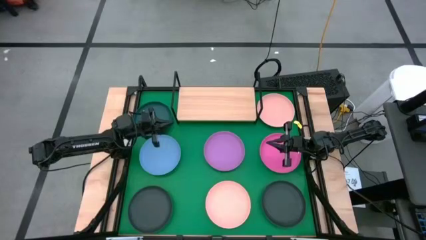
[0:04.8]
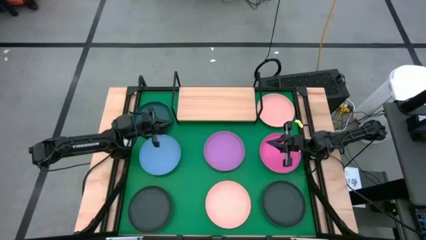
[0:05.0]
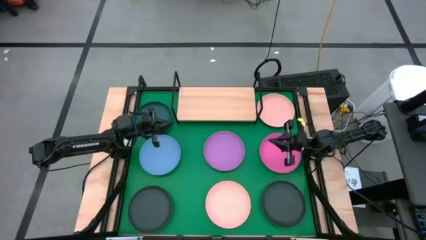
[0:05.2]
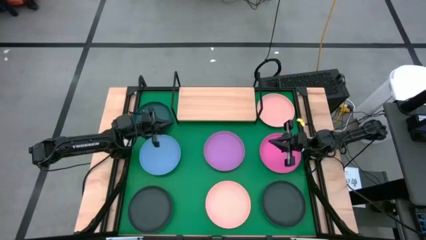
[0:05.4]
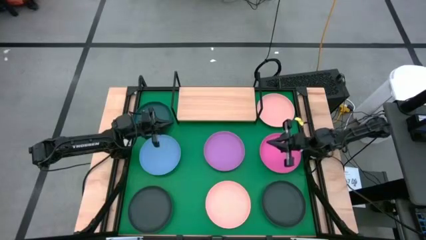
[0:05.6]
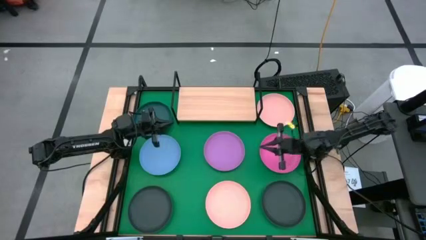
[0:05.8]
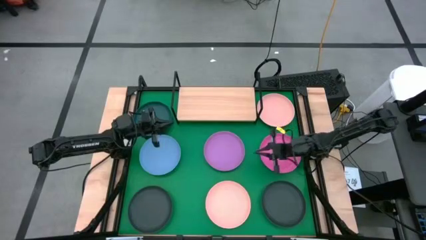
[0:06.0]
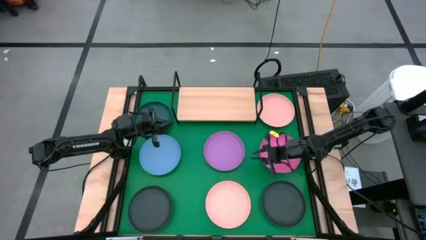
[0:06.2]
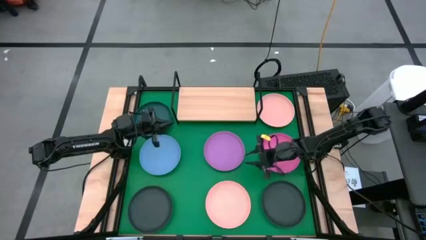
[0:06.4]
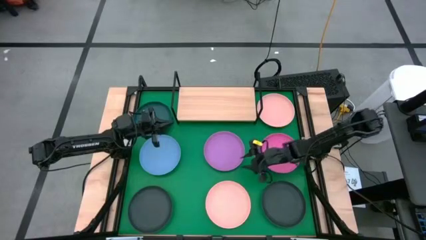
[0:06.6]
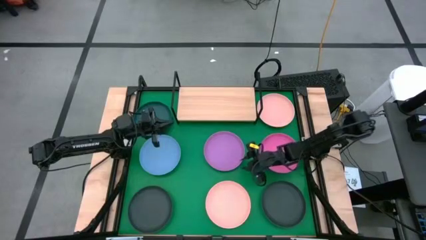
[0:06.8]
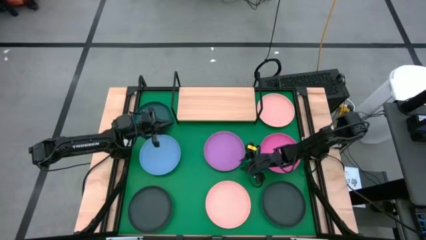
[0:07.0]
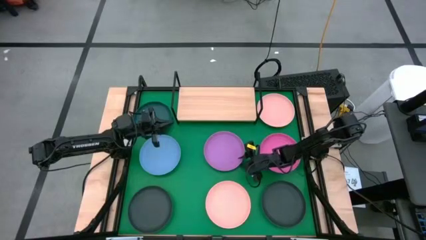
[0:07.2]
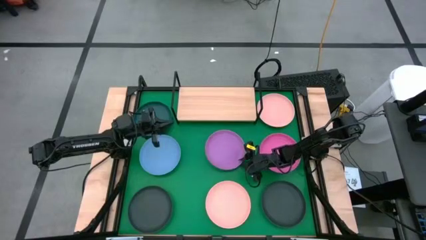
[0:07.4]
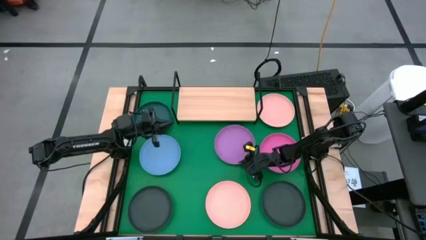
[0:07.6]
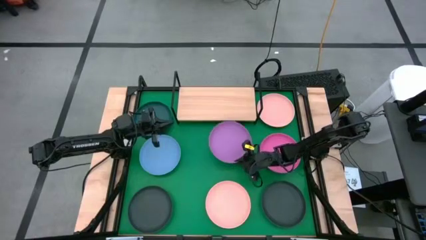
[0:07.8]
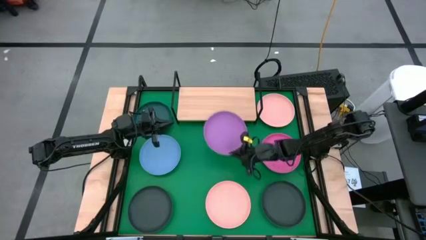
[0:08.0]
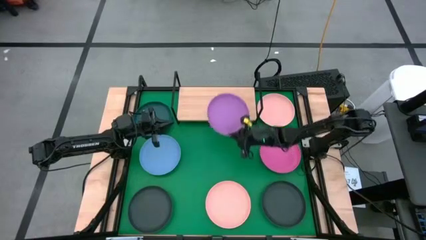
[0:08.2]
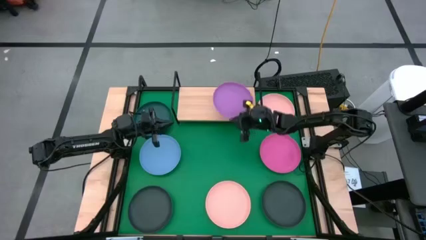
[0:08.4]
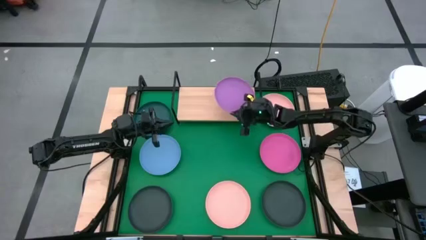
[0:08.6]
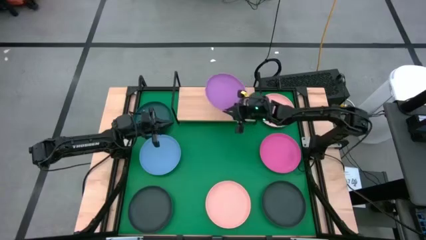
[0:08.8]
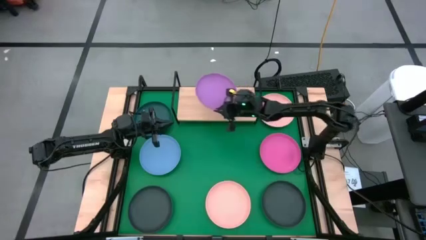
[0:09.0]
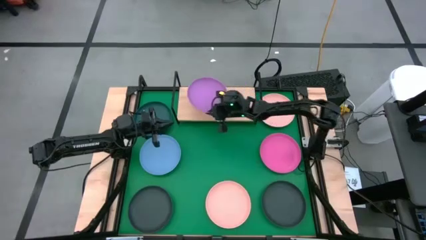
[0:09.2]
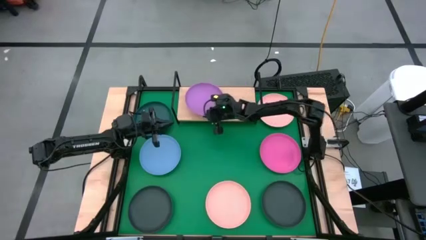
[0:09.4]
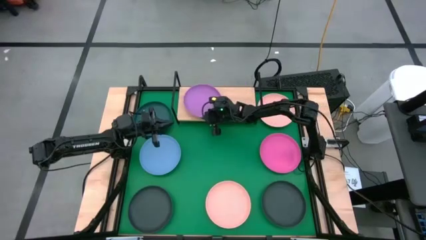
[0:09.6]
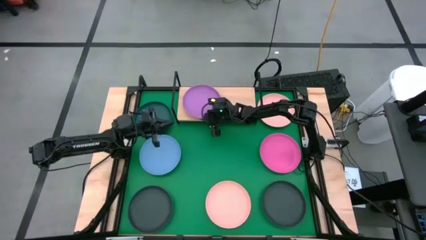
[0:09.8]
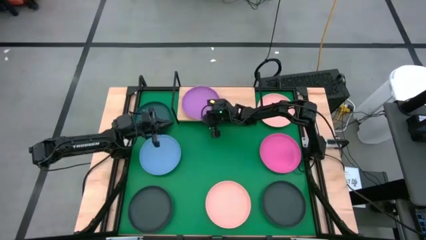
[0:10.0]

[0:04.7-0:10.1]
Task: Place and stack plates onto a shelf
Put the purple plate on the shelf

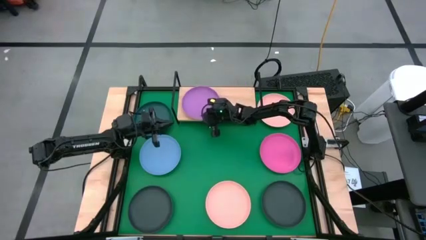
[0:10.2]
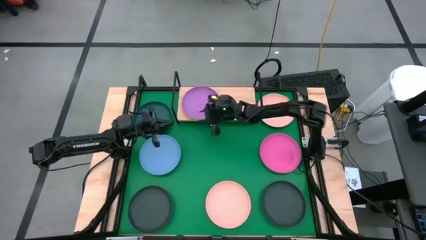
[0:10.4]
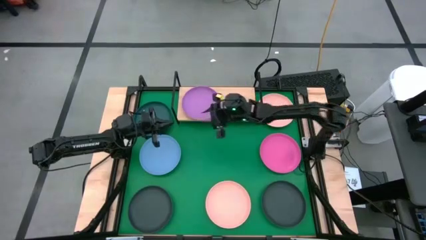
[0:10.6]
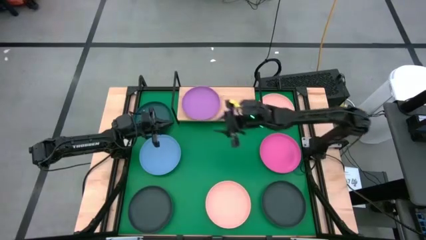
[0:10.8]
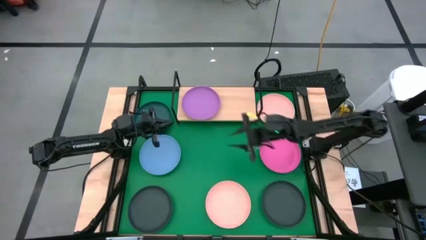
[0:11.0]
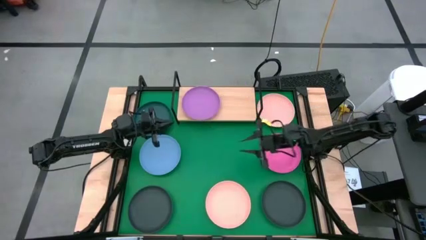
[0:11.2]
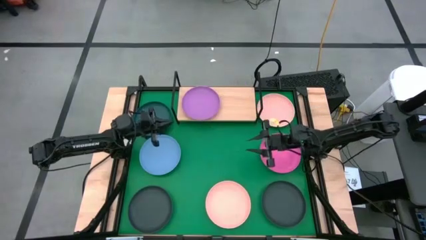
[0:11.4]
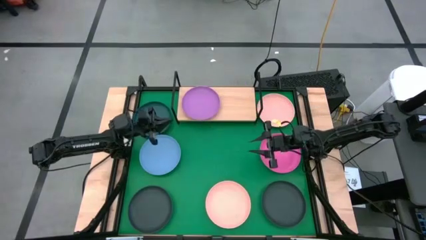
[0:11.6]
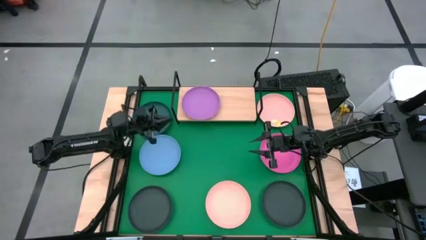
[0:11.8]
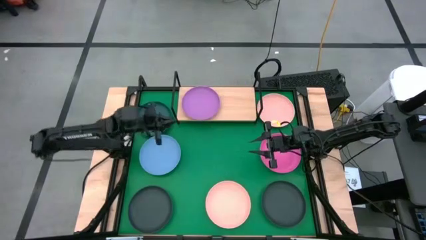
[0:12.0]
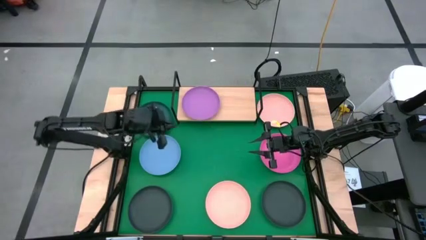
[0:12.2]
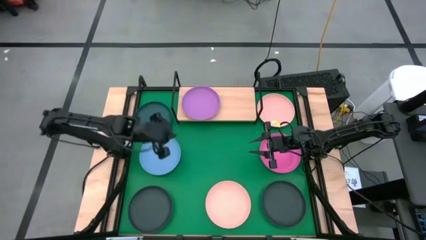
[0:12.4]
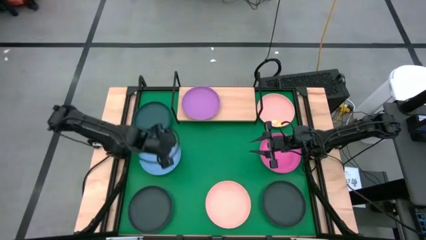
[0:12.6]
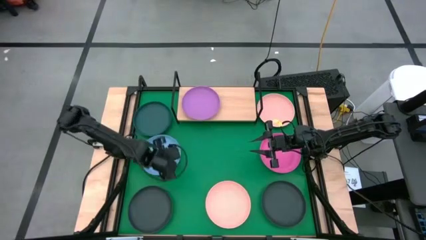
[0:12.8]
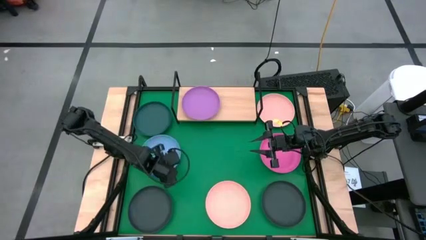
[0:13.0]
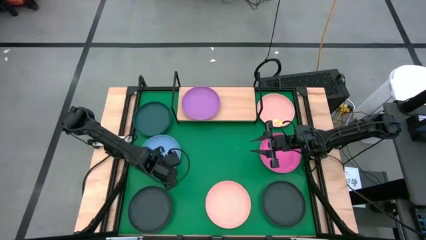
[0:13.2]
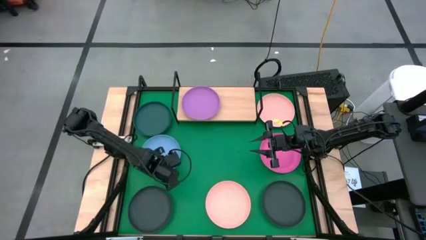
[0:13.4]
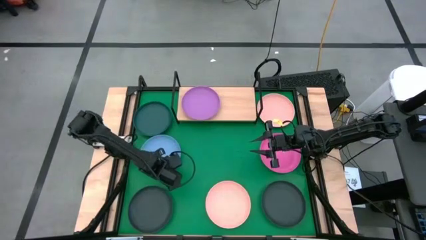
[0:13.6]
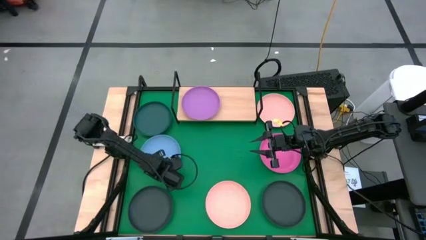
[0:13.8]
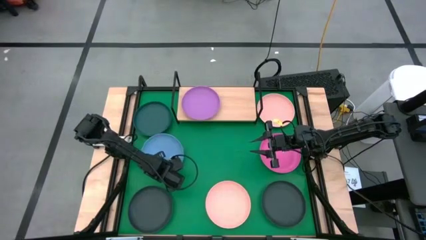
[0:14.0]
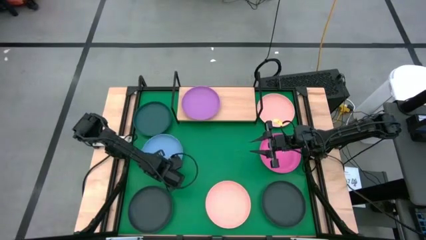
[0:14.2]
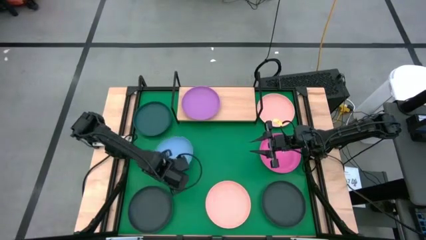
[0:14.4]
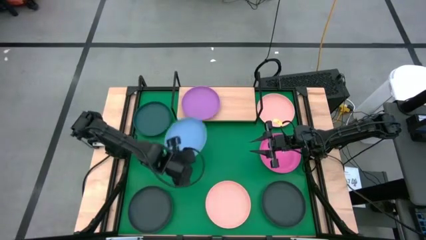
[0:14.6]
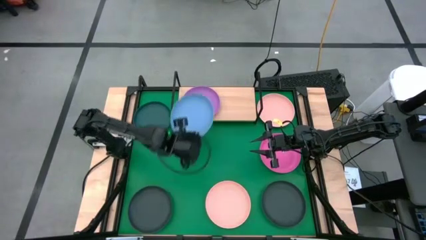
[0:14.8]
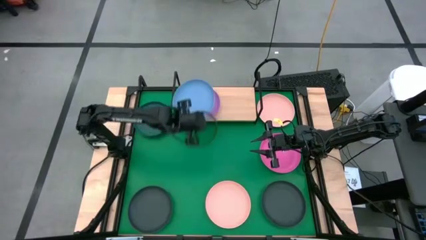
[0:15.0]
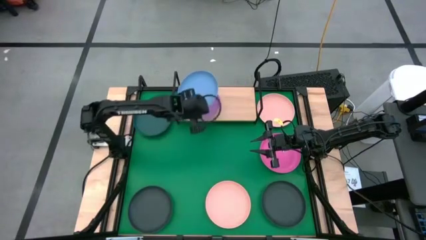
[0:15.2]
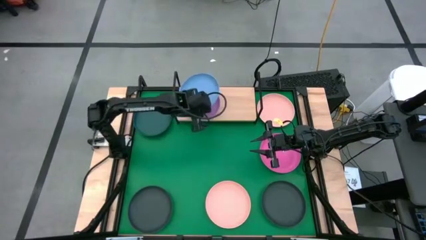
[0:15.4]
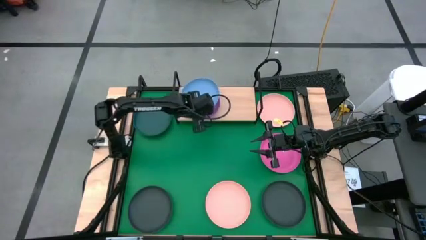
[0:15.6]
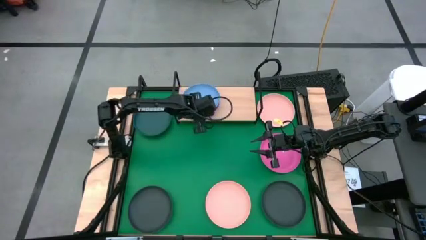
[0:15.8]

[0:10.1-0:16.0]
Stack the blue plate on top of the purple plate on the shelf

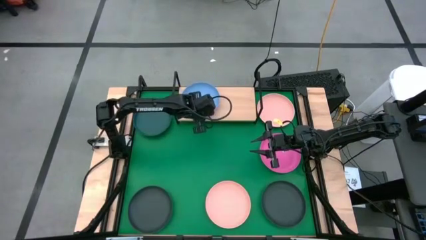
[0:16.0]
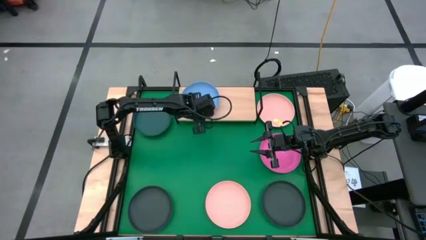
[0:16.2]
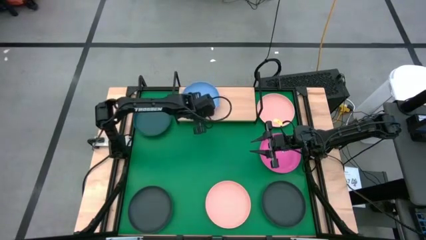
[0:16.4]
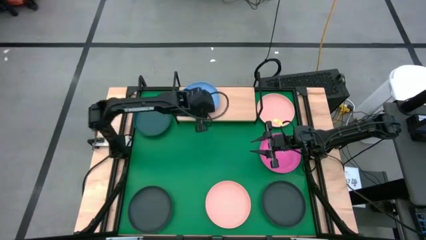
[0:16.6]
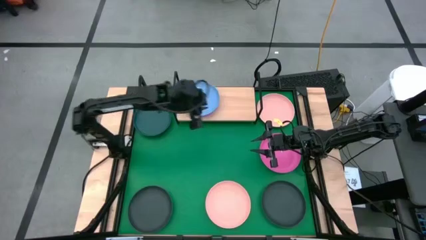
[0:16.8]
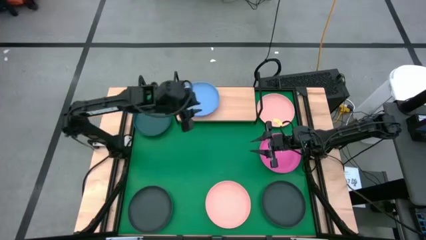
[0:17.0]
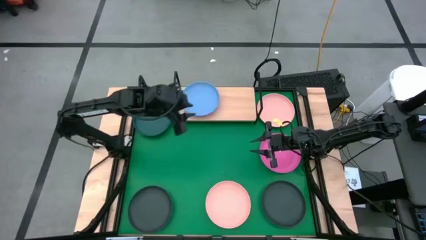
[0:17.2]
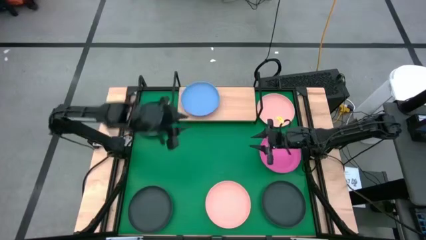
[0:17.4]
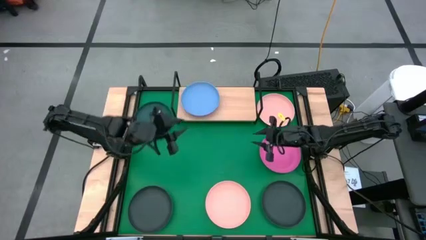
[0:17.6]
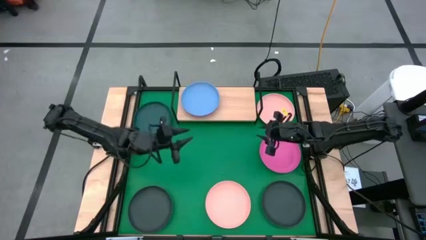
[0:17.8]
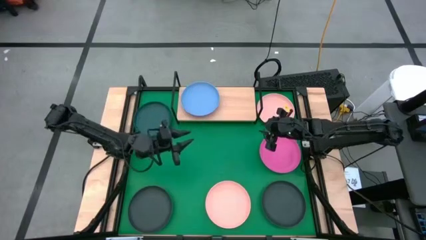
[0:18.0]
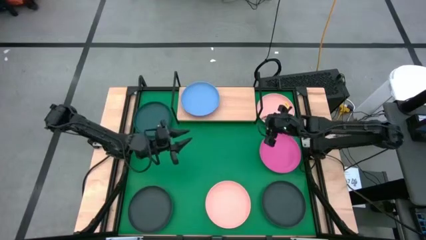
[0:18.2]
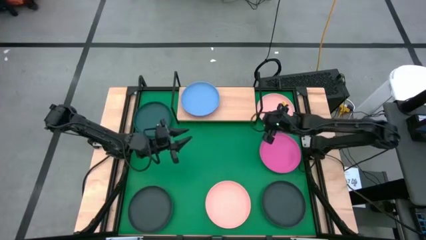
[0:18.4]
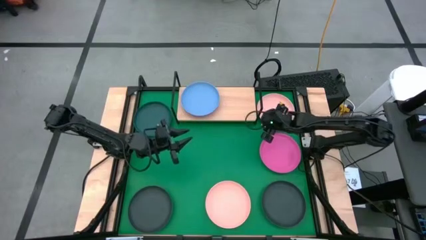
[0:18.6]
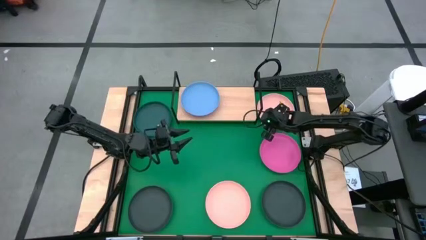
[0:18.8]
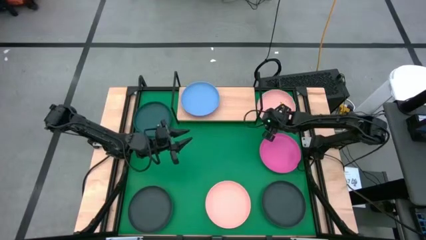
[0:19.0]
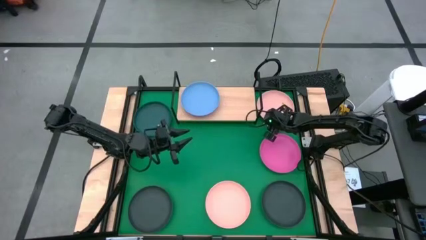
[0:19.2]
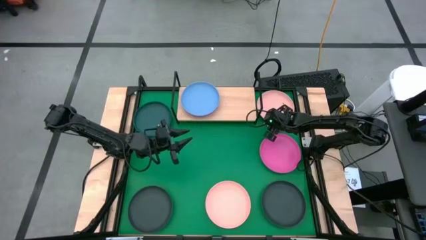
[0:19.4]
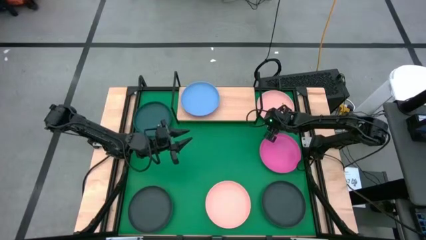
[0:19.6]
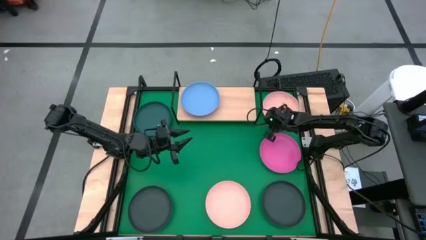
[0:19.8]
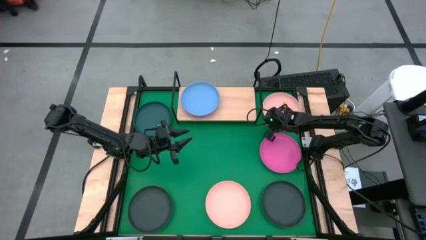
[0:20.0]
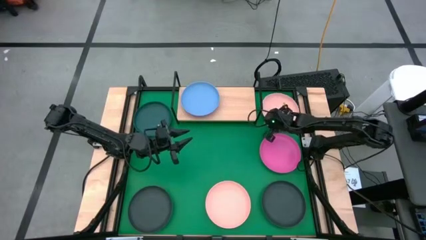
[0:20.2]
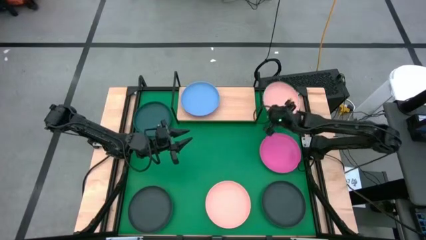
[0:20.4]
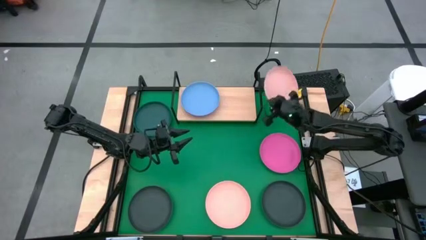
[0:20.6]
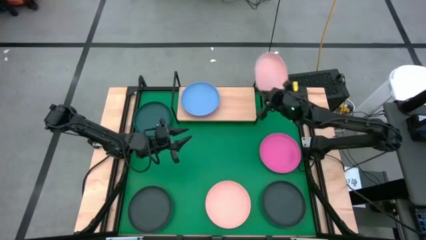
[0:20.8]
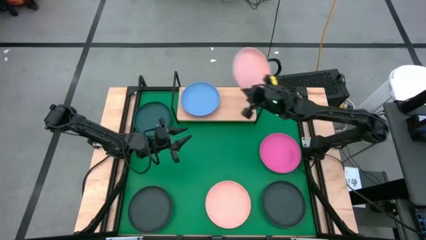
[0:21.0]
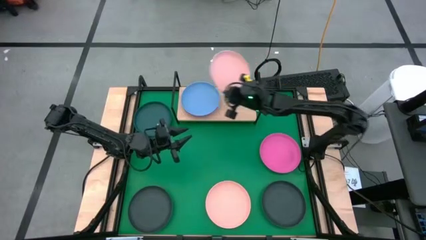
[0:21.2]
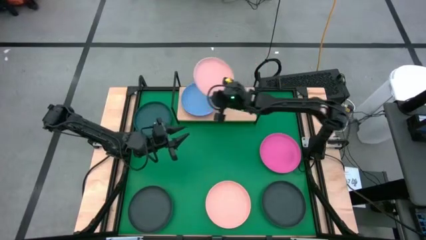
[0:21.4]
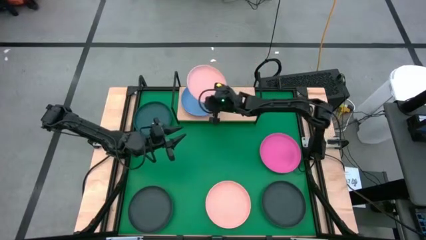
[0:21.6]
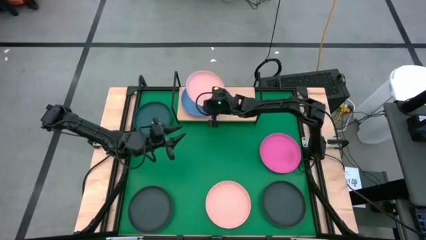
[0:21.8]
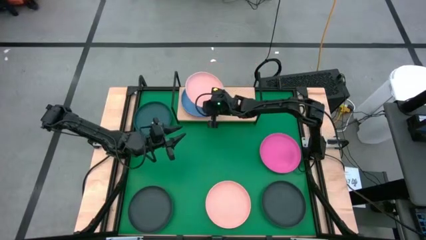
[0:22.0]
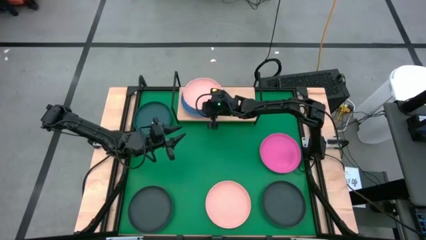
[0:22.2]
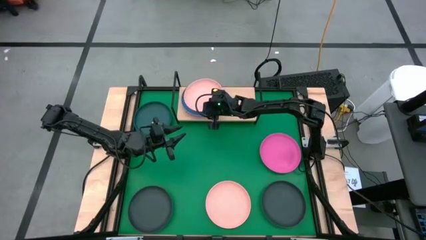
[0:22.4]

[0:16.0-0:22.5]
Stack the top light orange plate on top of the blue plate on the shelf
